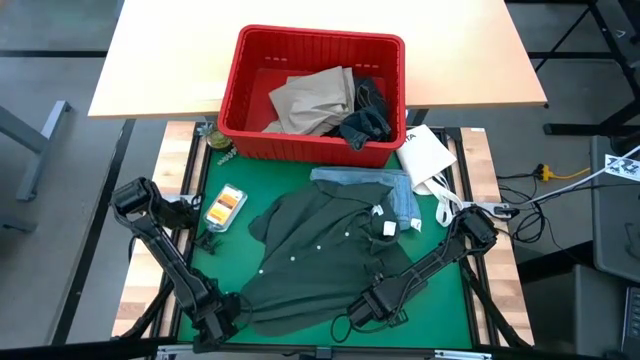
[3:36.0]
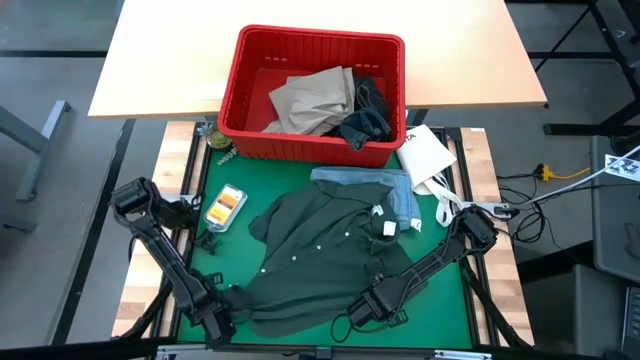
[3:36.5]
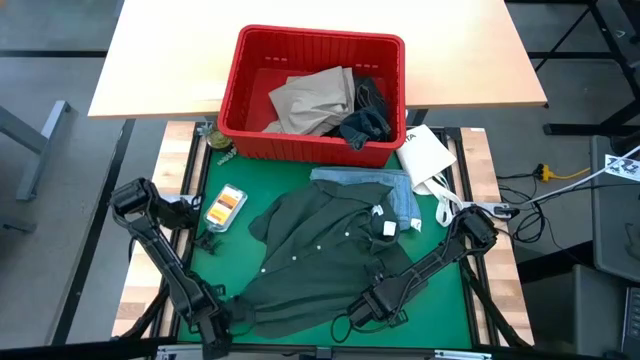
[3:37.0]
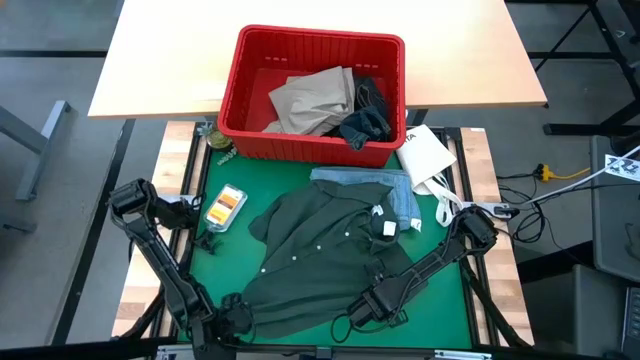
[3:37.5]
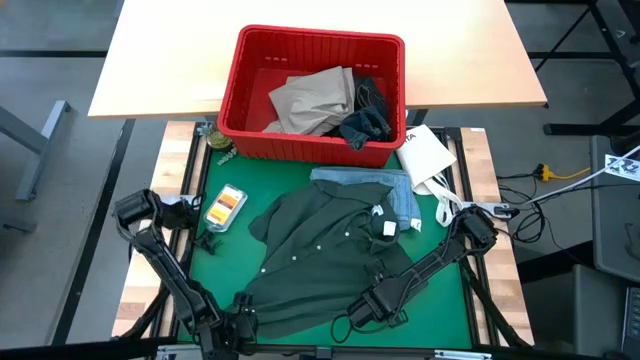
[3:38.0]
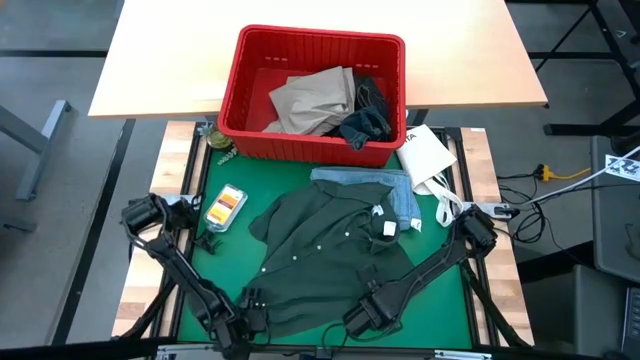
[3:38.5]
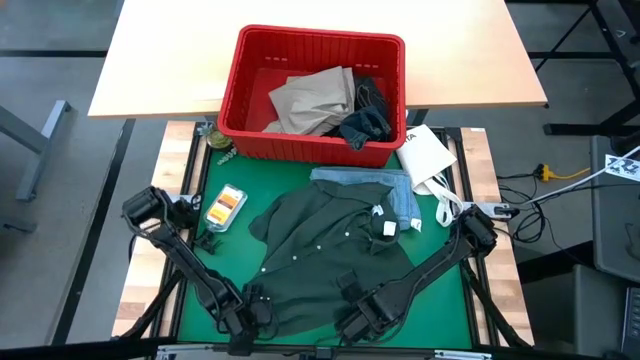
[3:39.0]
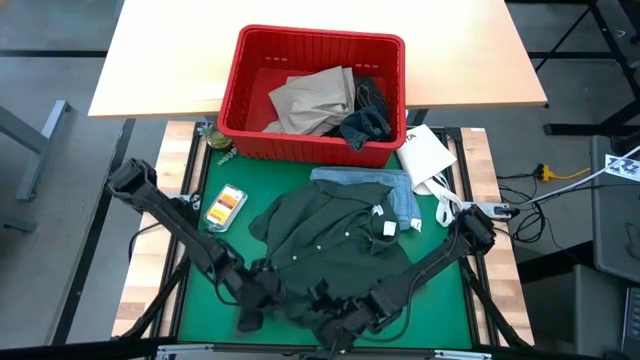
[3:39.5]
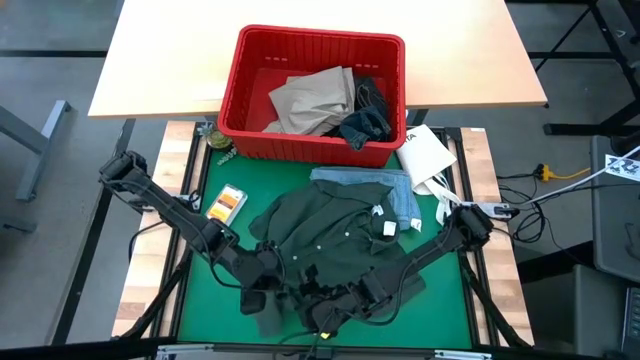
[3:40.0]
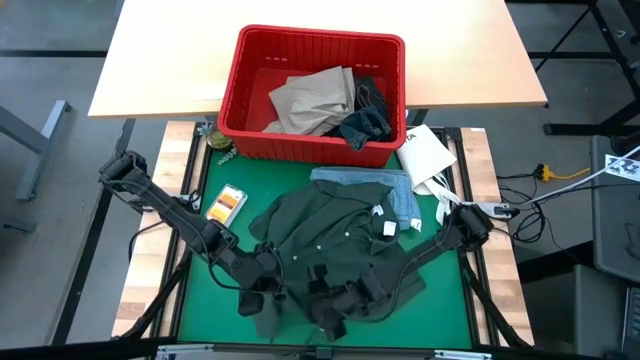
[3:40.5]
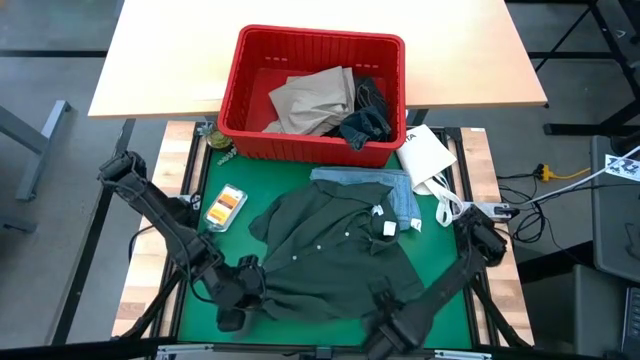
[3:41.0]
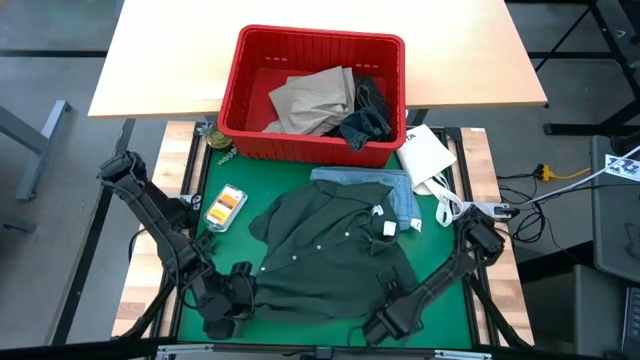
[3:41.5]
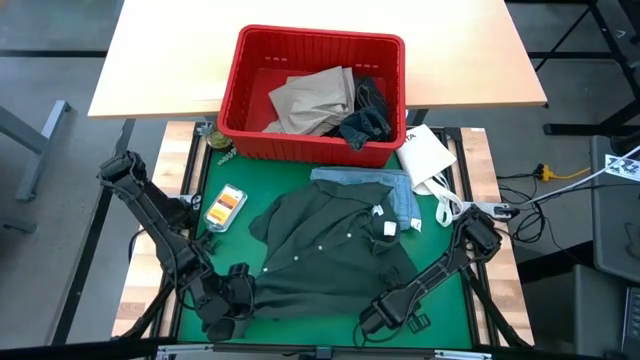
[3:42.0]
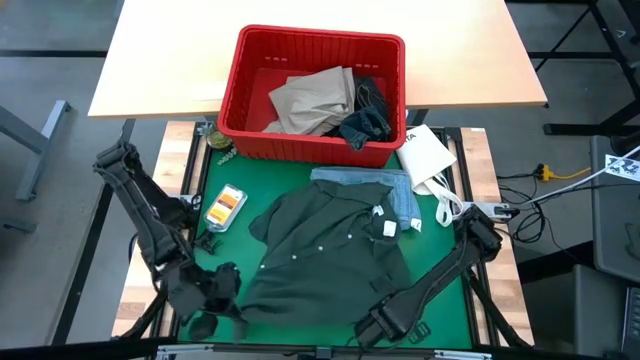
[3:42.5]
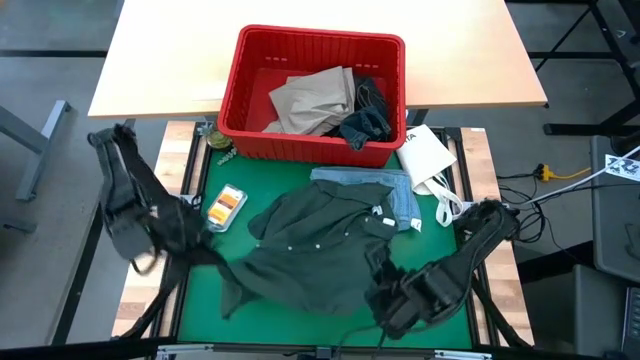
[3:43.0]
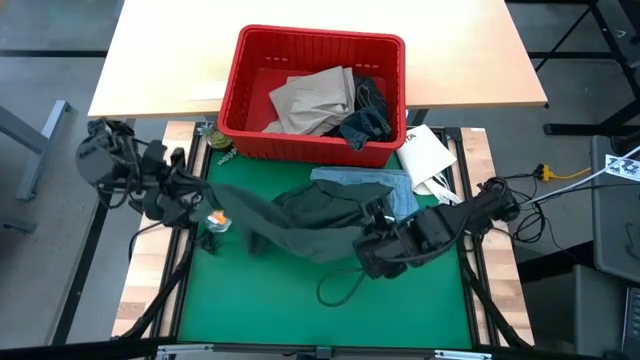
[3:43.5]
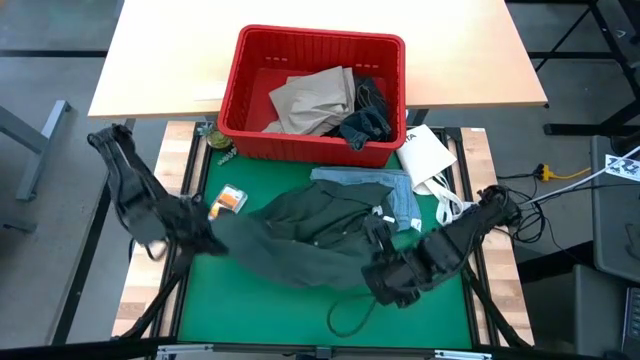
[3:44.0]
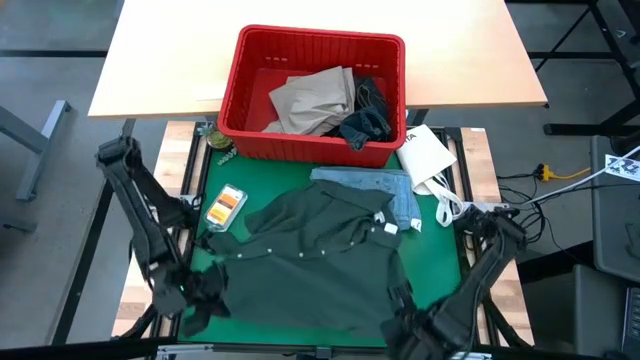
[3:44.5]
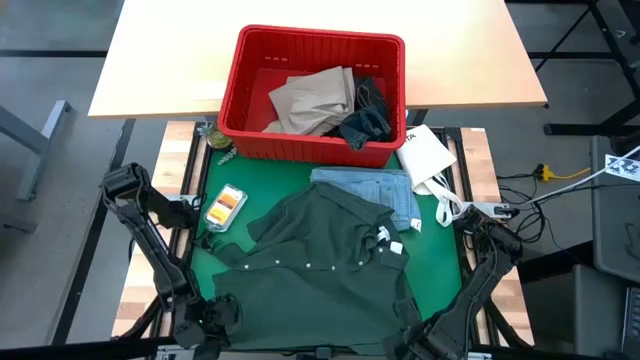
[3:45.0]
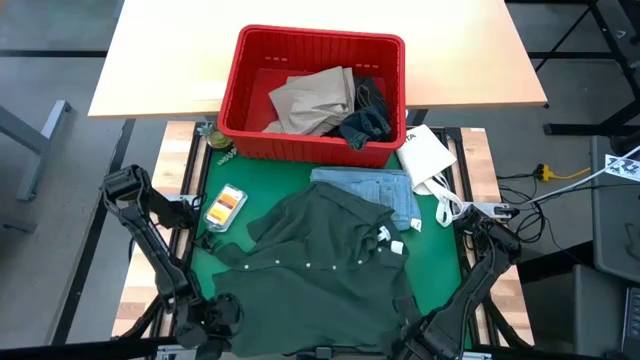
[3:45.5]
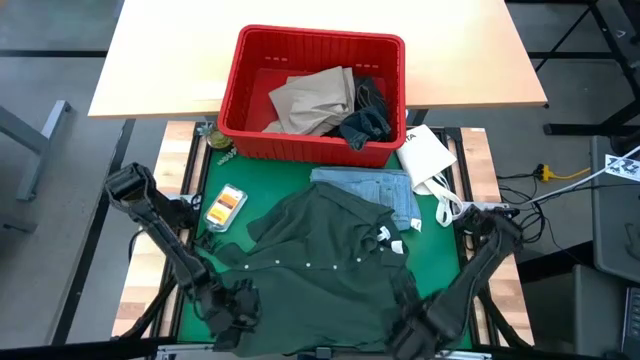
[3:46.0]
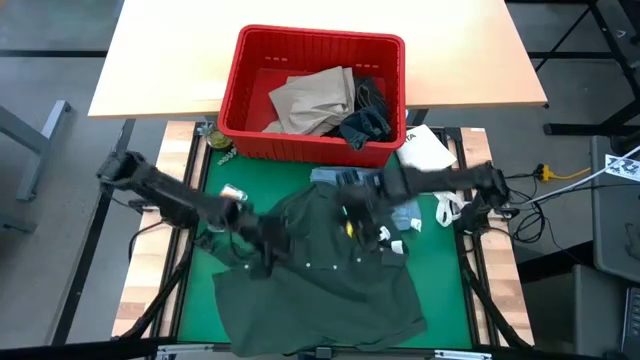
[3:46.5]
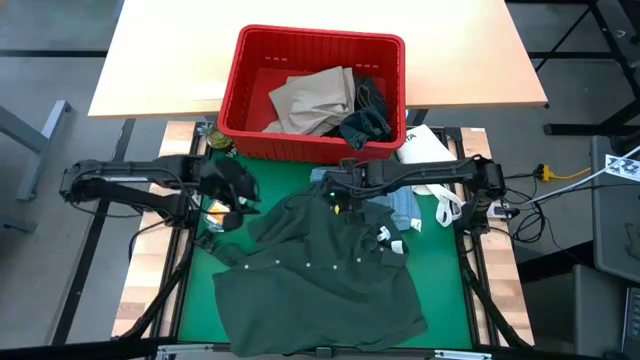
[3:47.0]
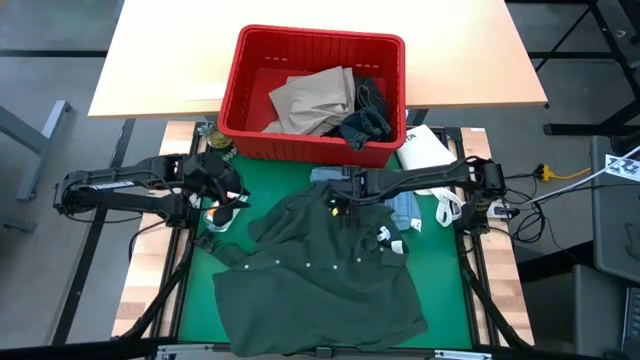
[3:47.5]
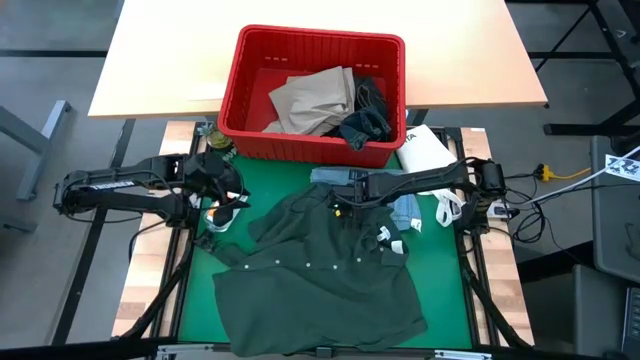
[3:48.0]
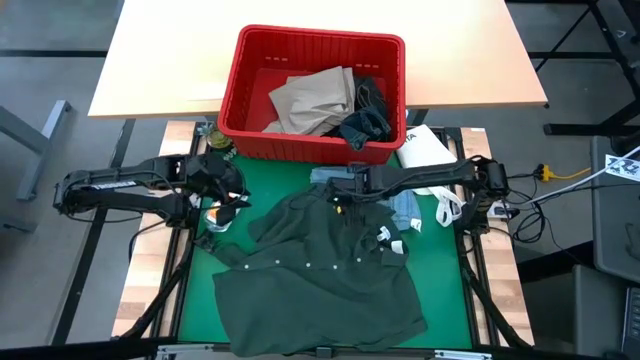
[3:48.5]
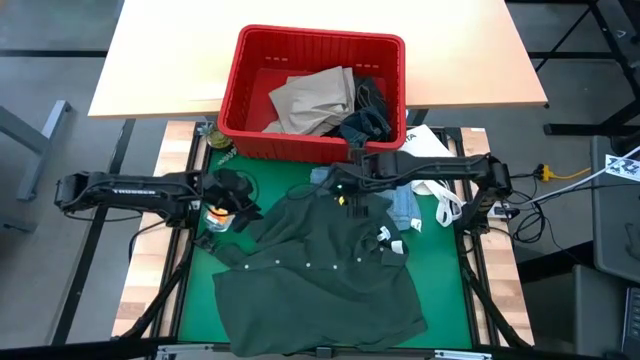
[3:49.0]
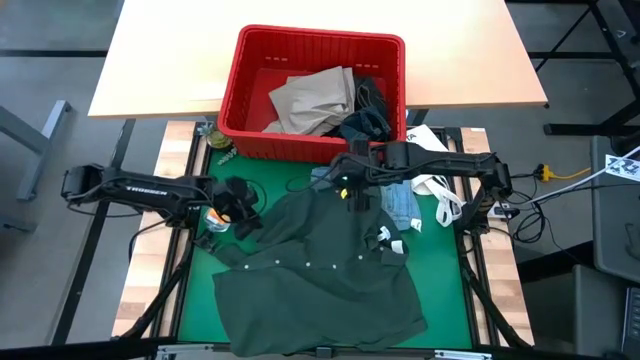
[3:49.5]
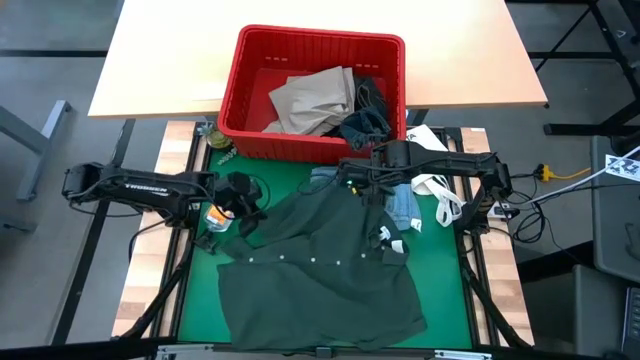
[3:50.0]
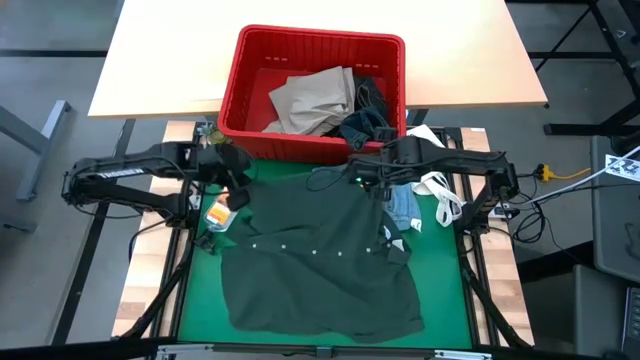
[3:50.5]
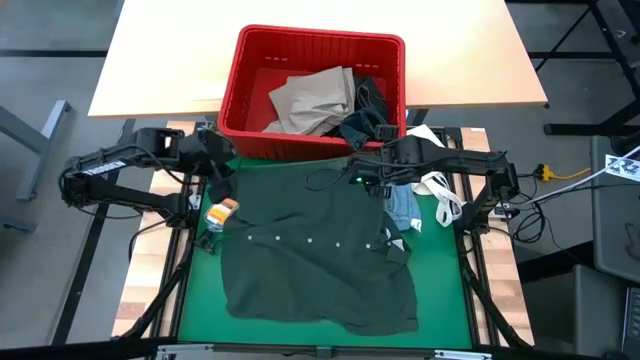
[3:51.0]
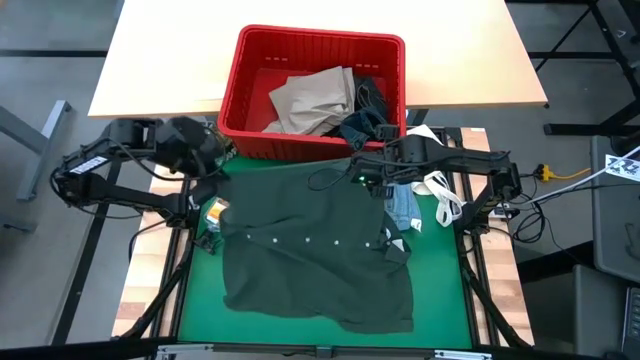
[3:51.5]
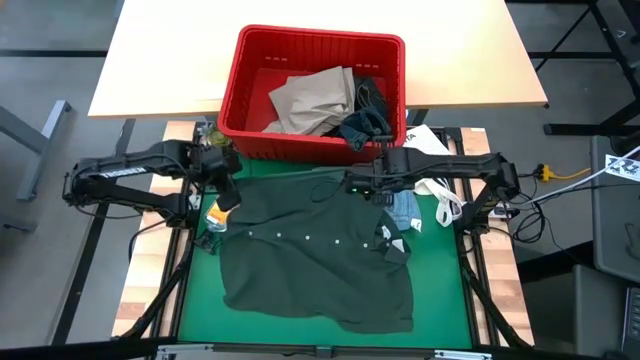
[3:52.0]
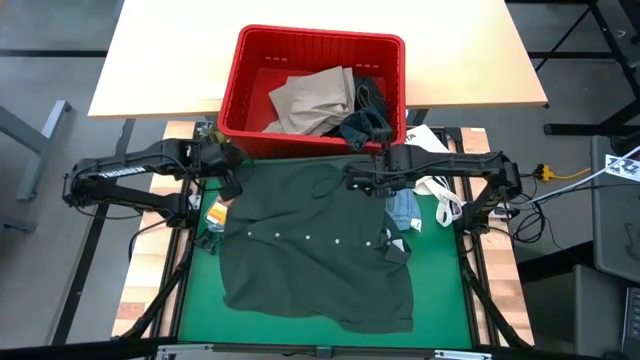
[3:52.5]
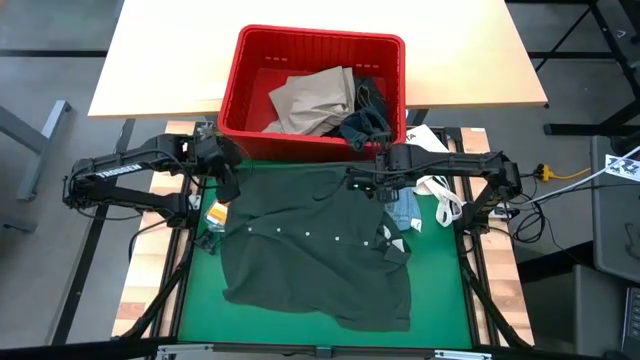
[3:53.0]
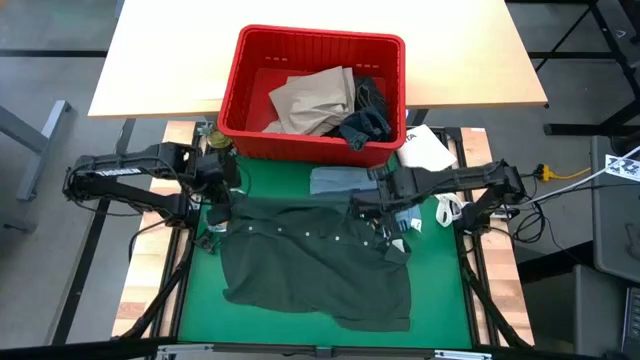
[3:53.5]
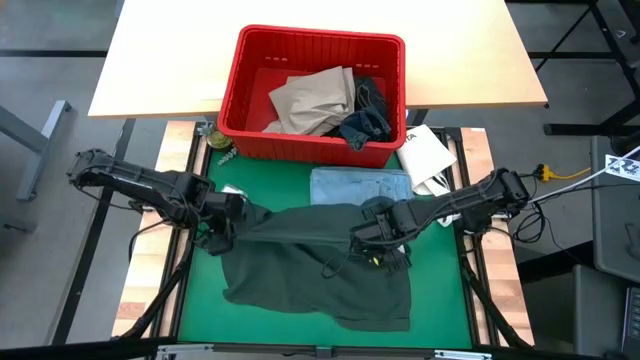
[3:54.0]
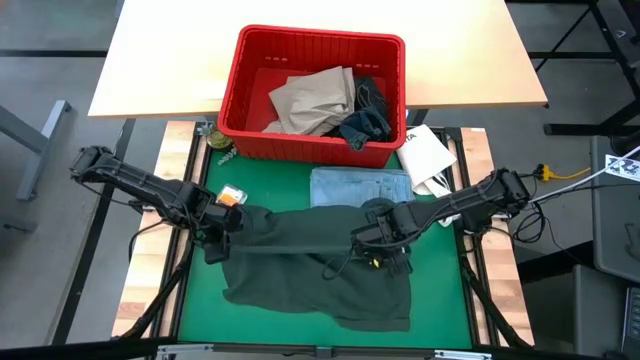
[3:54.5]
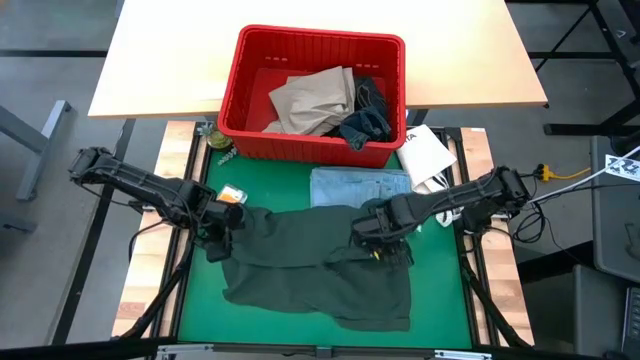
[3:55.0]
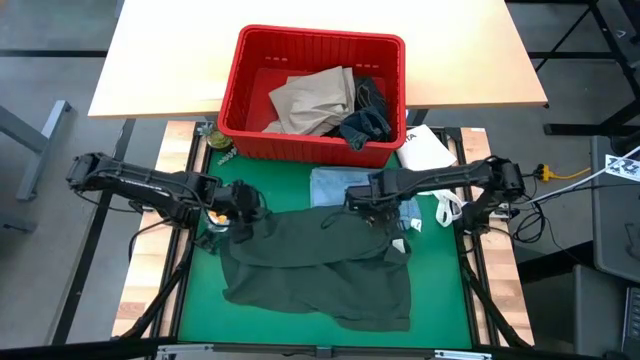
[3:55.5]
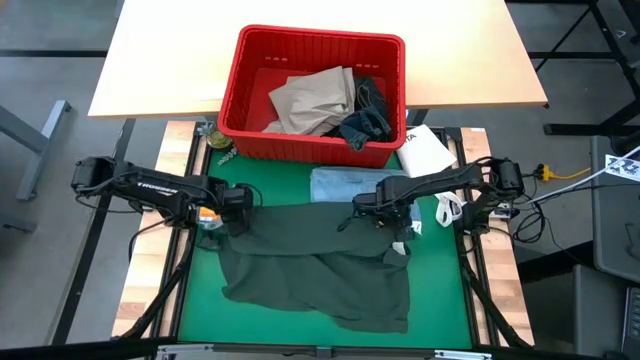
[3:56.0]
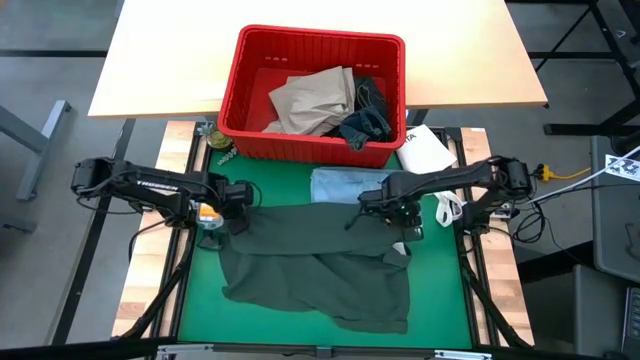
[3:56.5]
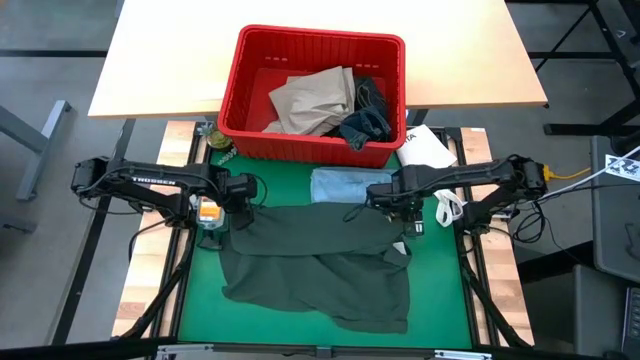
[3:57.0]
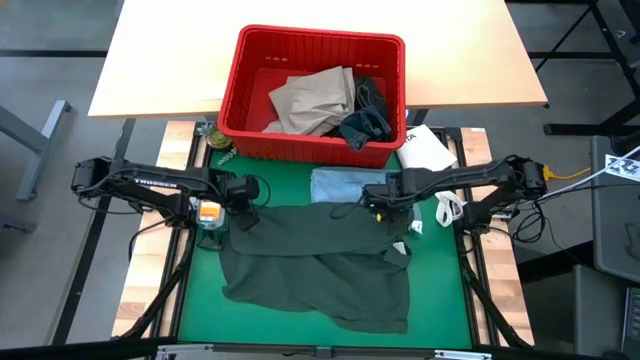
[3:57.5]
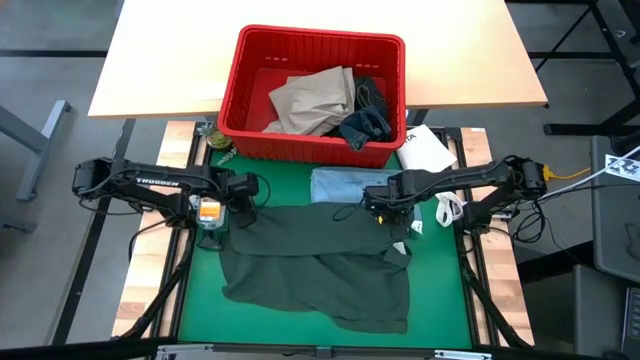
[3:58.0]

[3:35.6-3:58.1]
Task: Fold Laundry from Bin
Fold the green polo shirt
